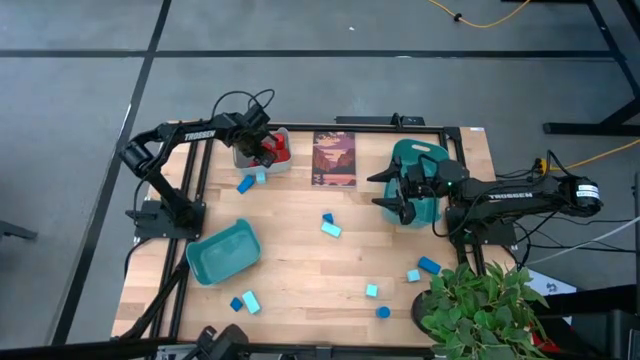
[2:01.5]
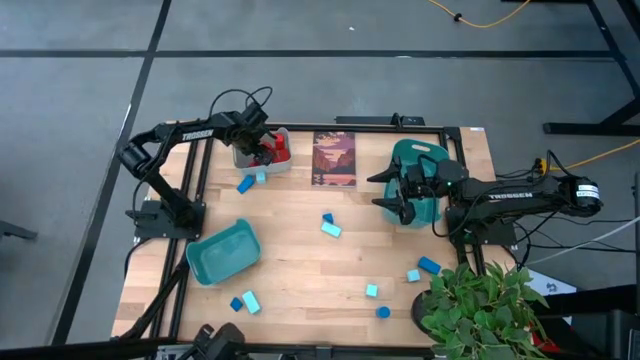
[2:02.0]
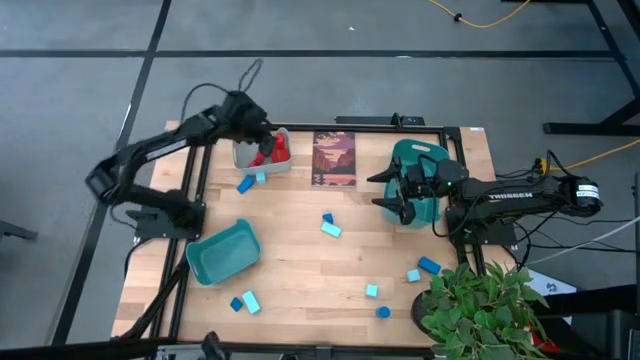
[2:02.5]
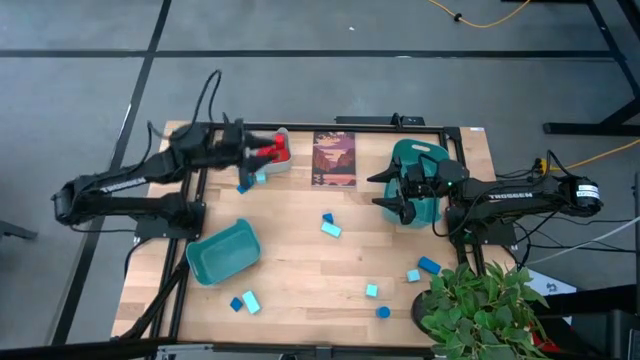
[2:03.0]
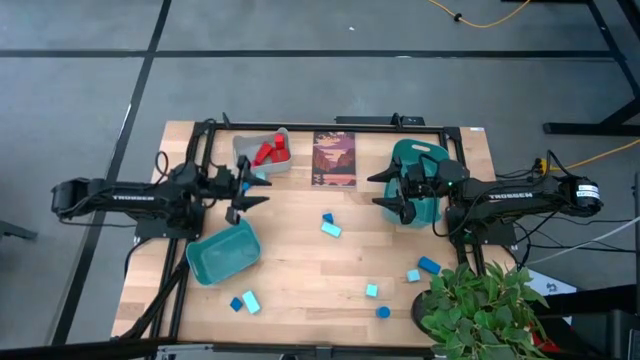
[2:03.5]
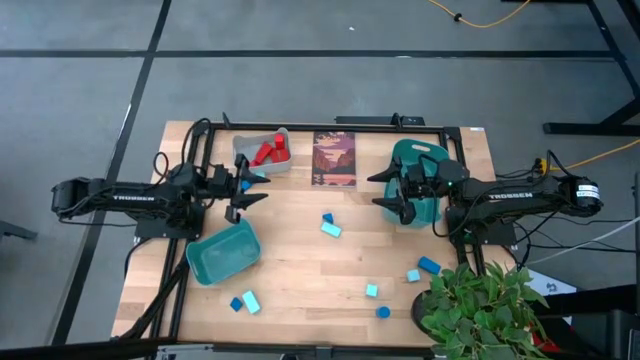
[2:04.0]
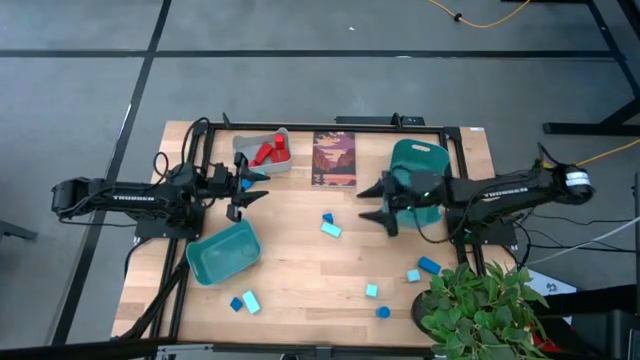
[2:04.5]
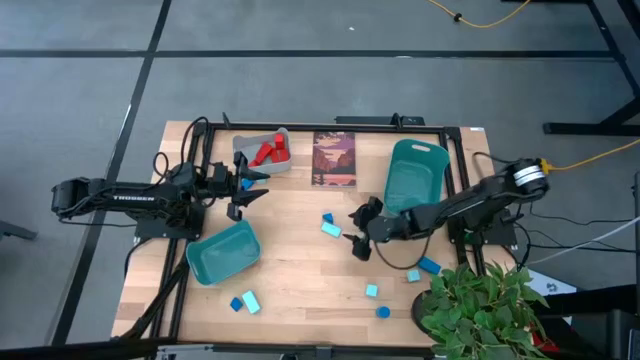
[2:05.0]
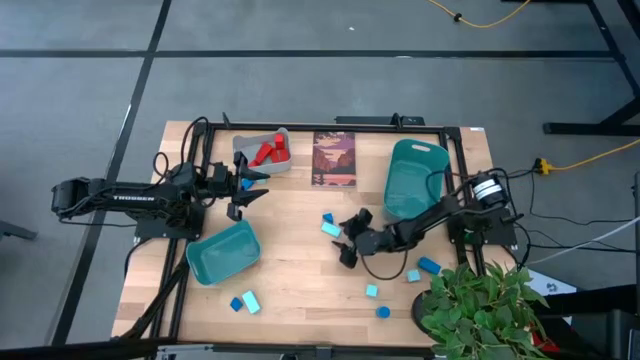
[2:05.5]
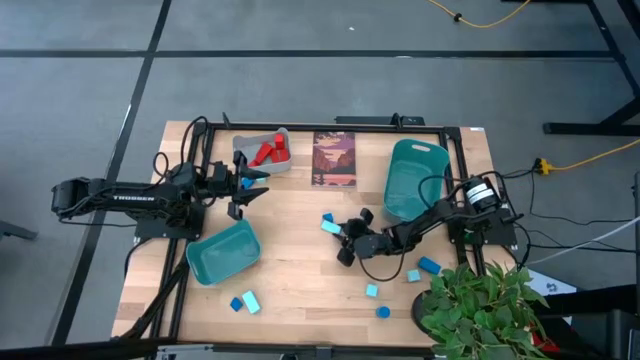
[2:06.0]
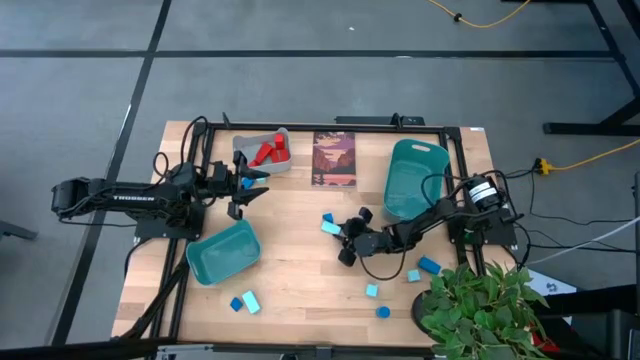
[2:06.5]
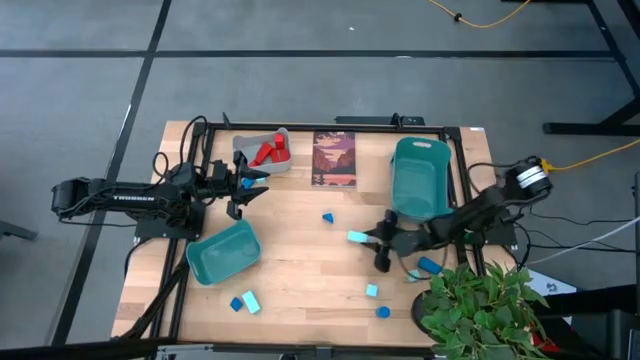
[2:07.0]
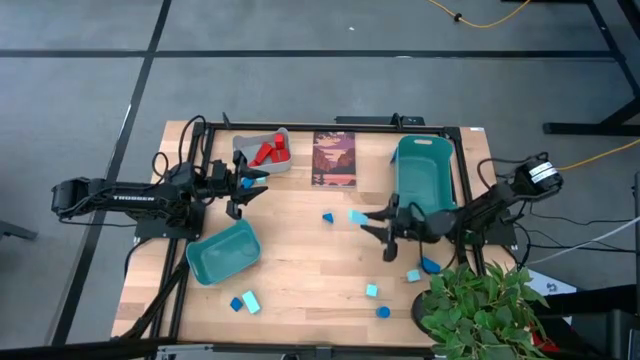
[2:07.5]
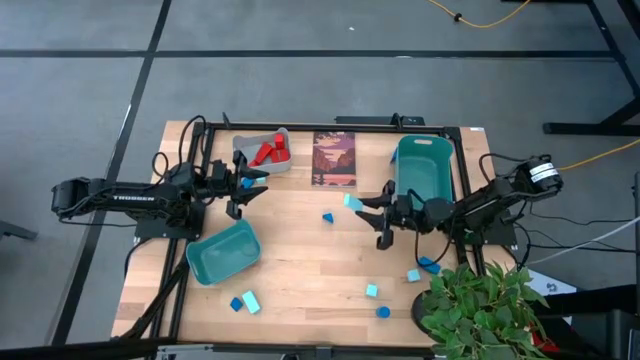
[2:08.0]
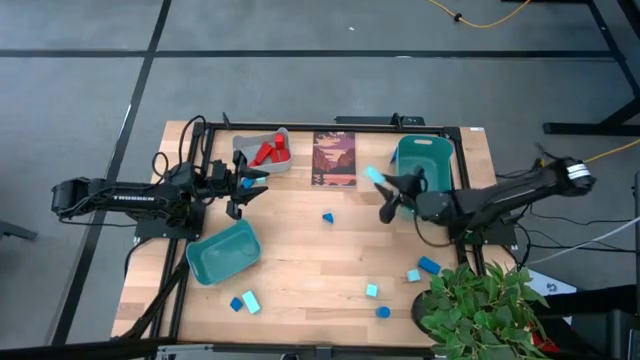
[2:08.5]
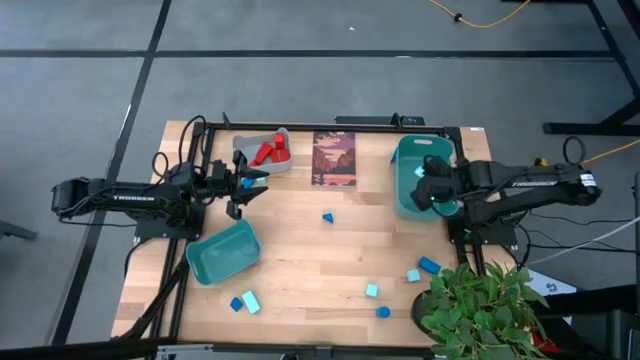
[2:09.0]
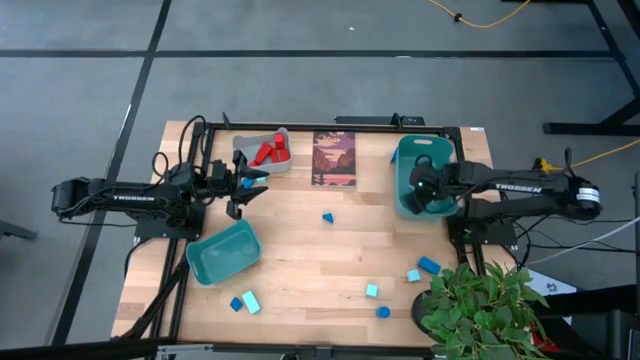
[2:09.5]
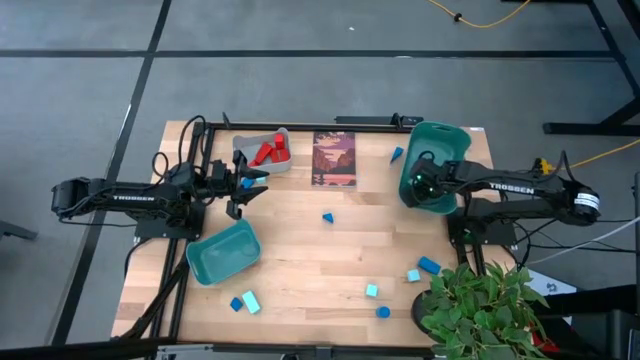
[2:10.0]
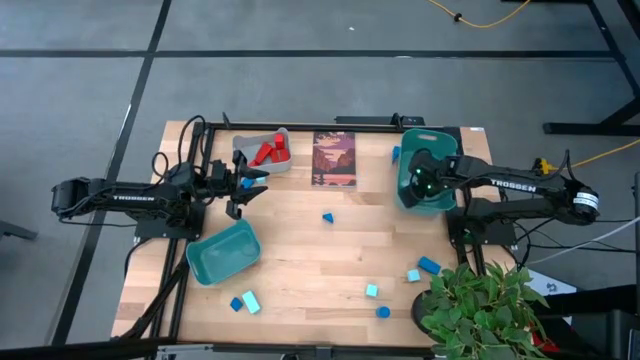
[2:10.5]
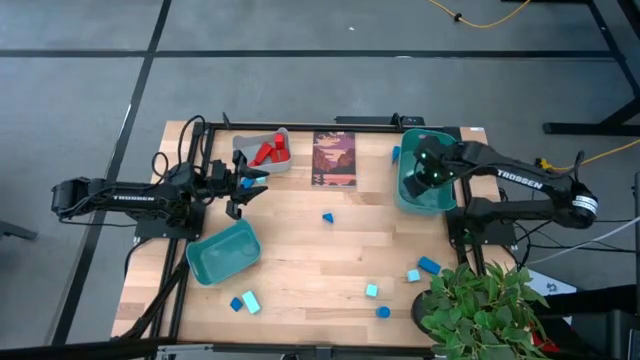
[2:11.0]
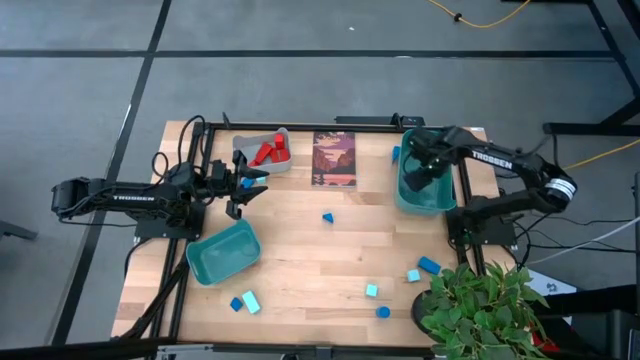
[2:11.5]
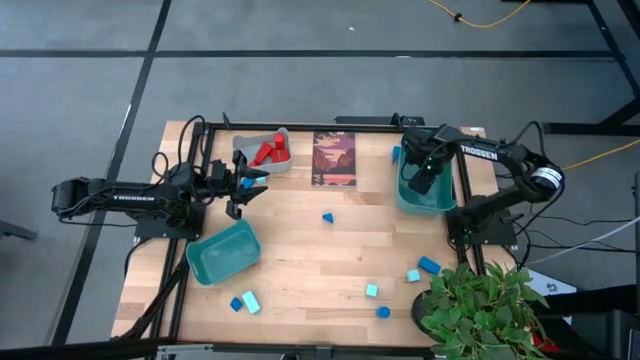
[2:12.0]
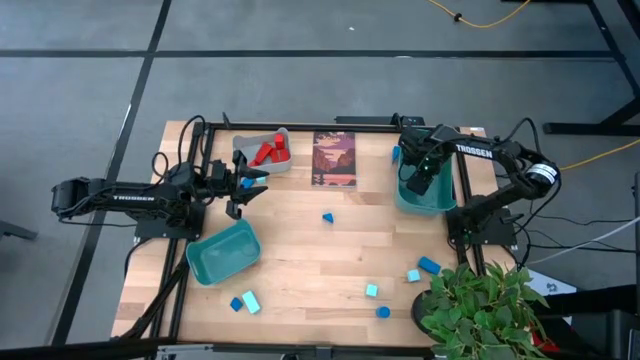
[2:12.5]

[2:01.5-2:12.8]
Task: Sort & place blocks by color
Put the light blue block into the right green bin

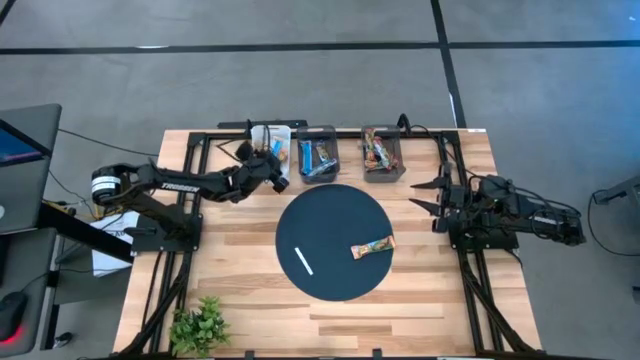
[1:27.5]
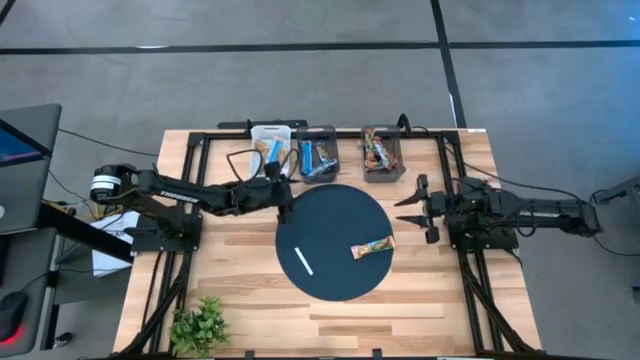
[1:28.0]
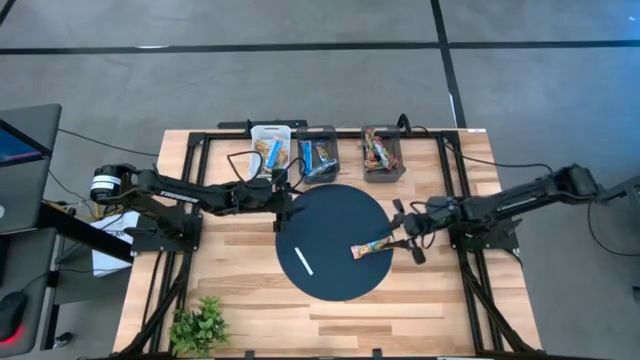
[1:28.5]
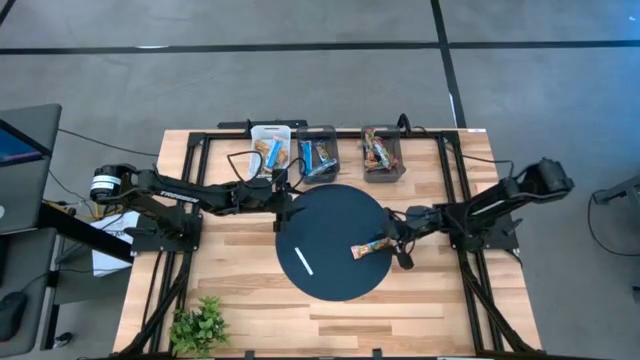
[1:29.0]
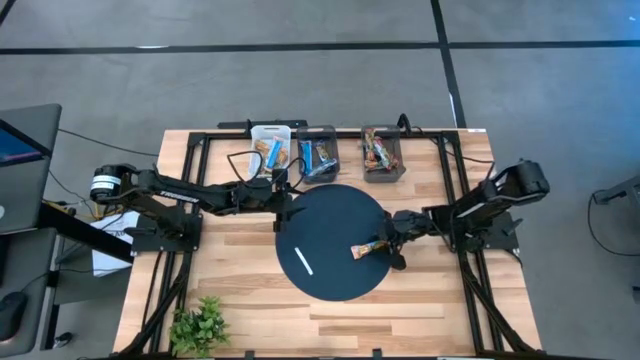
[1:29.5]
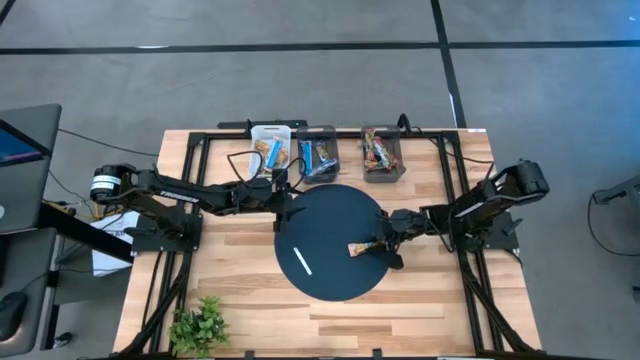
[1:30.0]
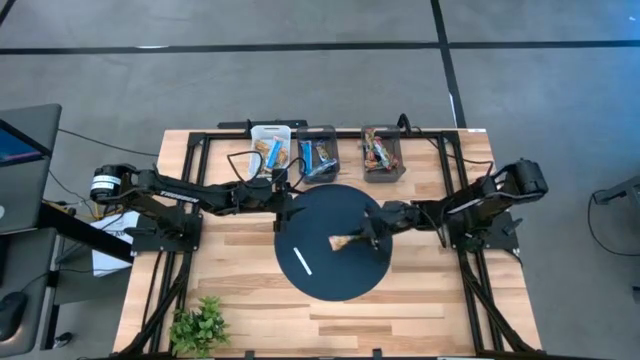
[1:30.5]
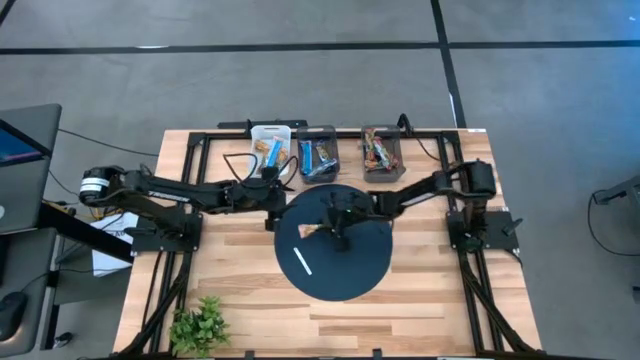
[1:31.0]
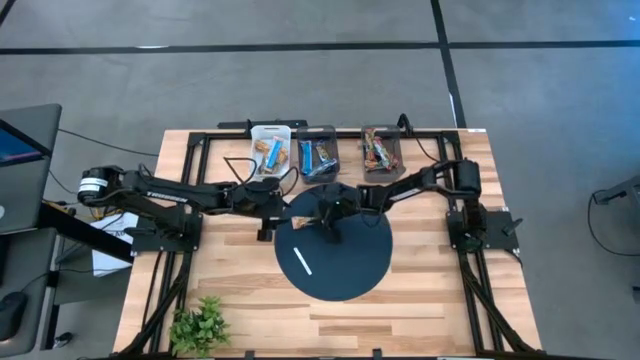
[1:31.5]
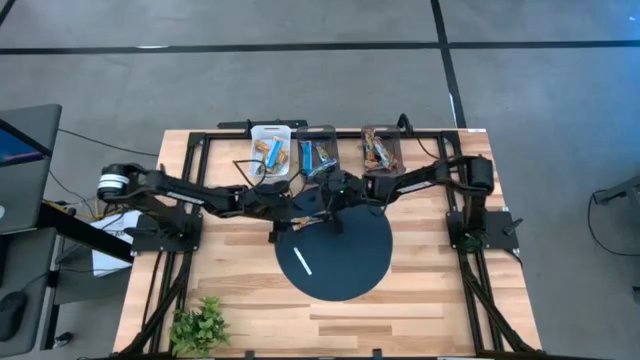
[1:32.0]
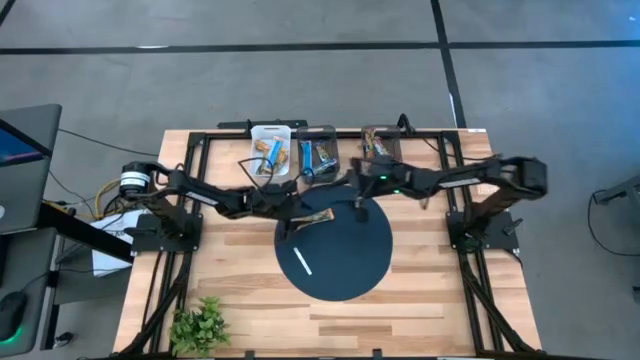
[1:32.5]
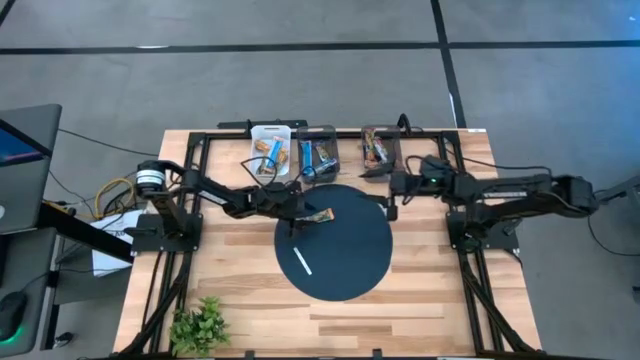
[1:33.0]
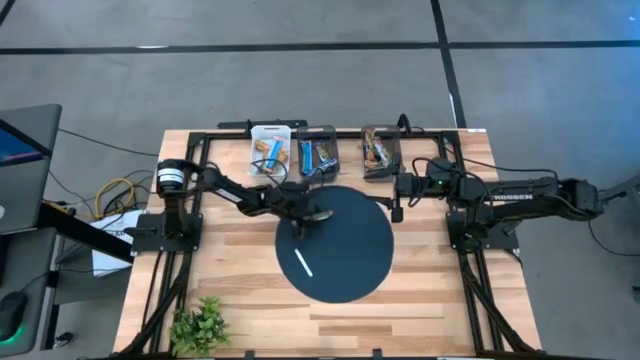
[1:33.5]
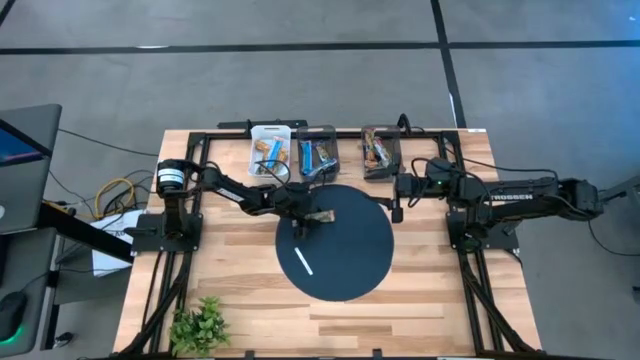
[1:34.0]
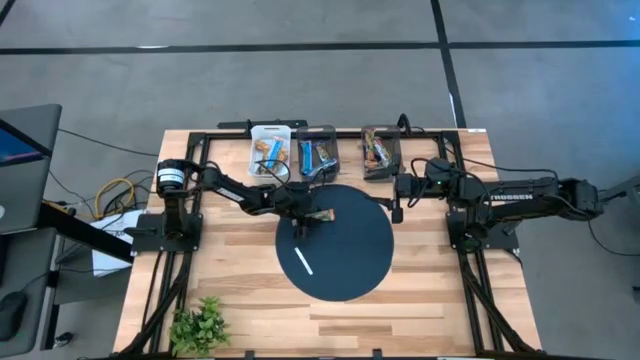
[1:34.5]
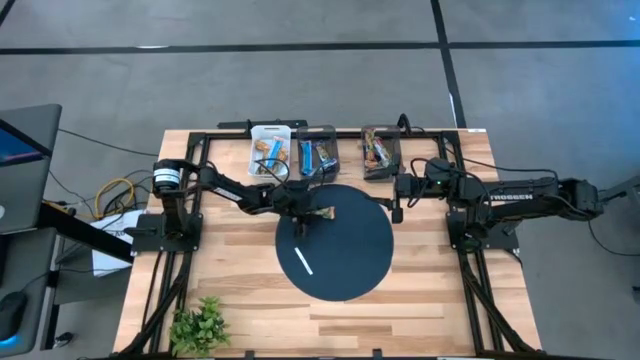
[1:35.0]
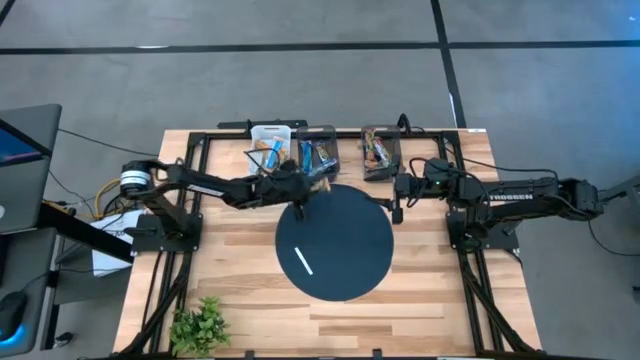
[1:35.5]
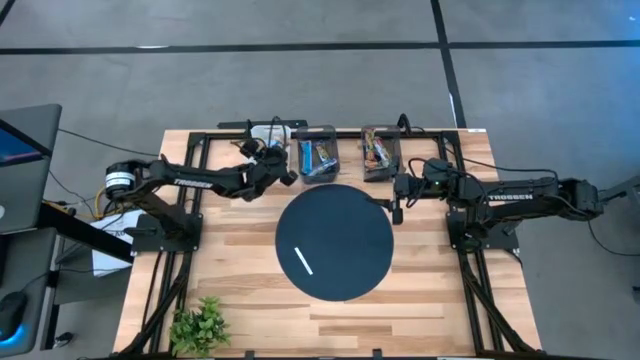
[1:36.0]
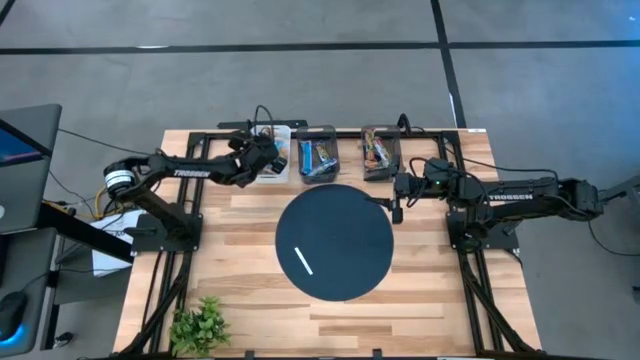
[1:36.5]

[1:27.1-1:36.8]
Task: Pick and place Granola Bars by type
Put the orange granola bar into the white bin
